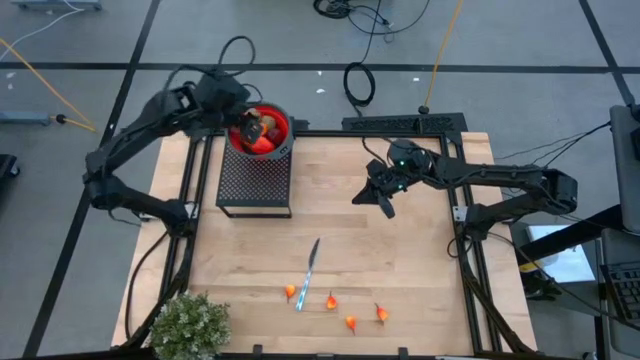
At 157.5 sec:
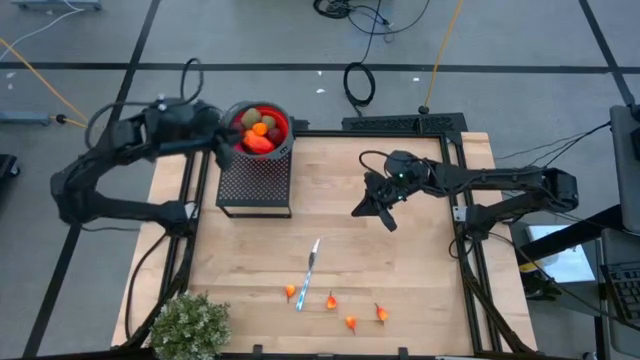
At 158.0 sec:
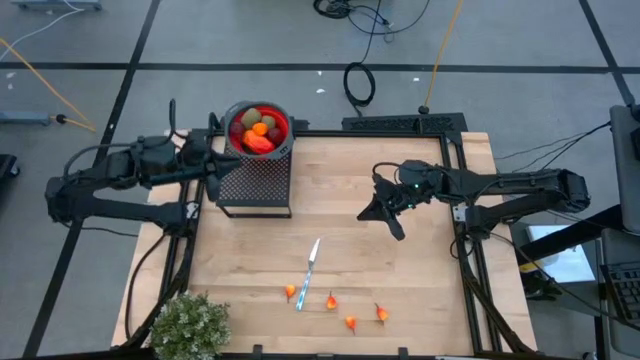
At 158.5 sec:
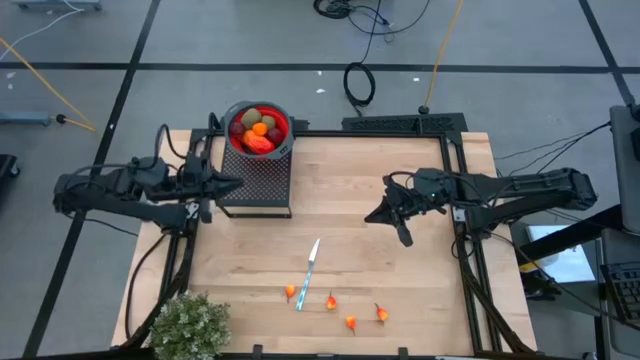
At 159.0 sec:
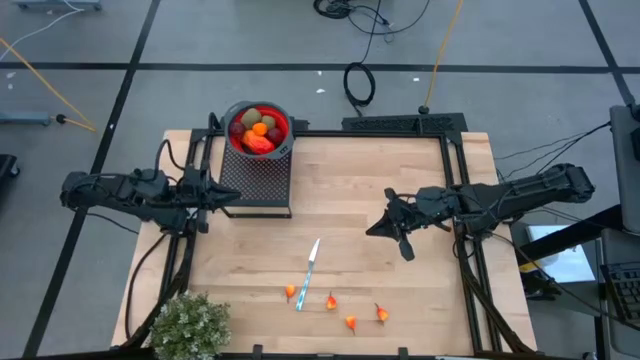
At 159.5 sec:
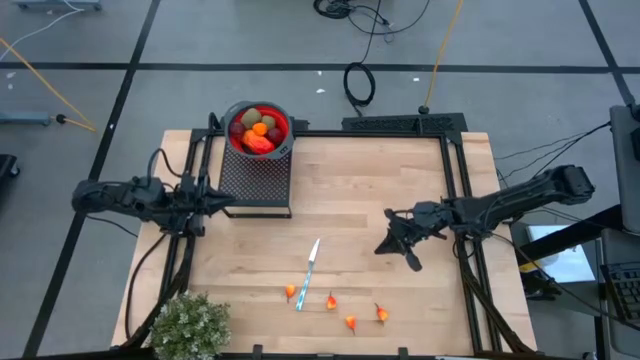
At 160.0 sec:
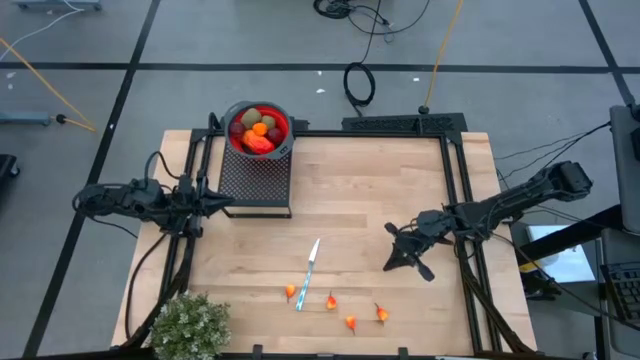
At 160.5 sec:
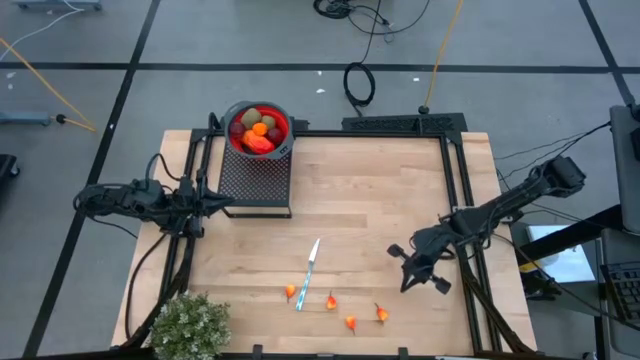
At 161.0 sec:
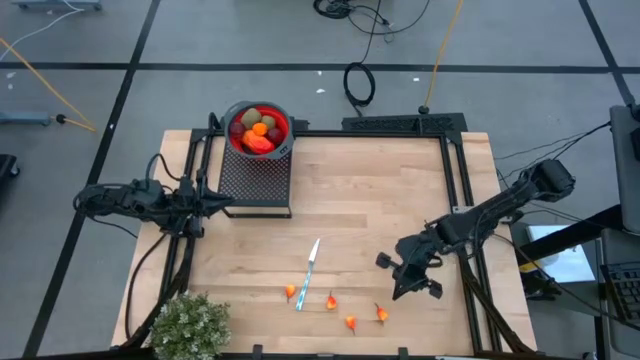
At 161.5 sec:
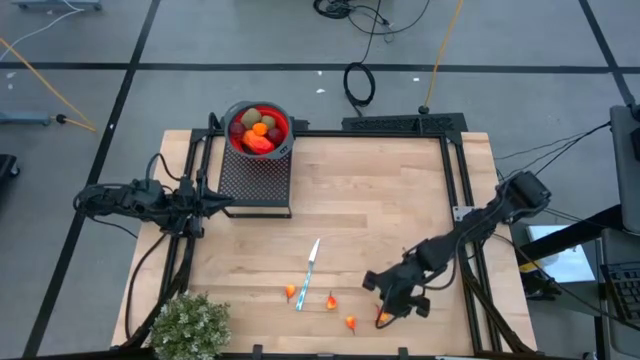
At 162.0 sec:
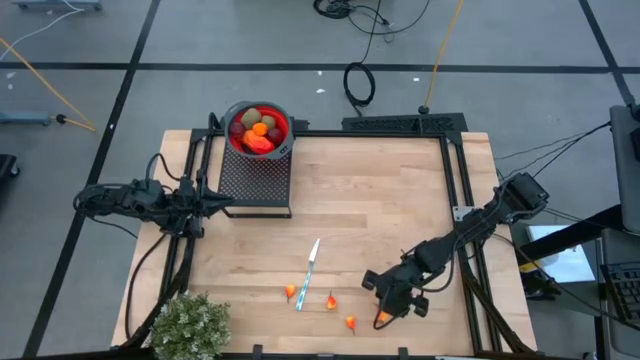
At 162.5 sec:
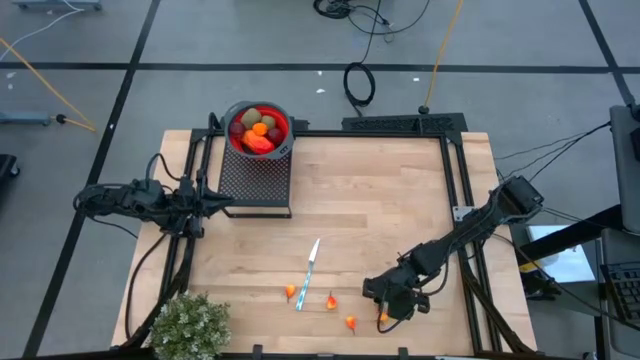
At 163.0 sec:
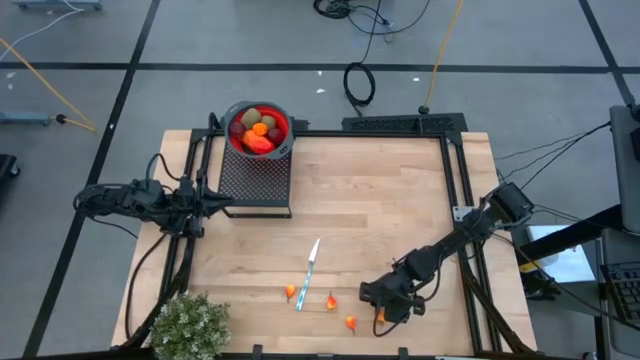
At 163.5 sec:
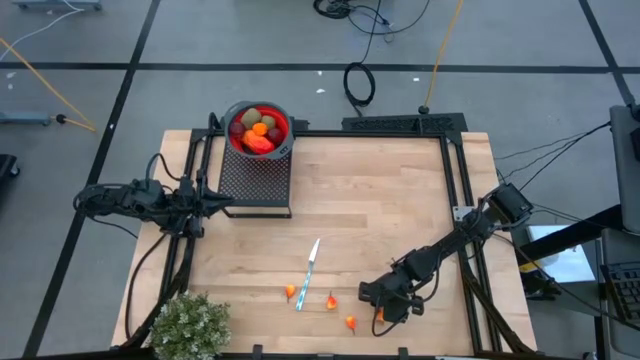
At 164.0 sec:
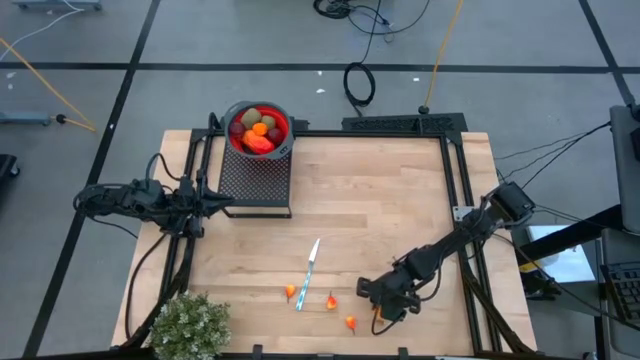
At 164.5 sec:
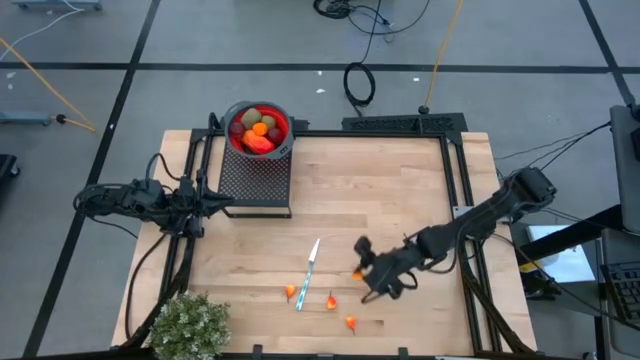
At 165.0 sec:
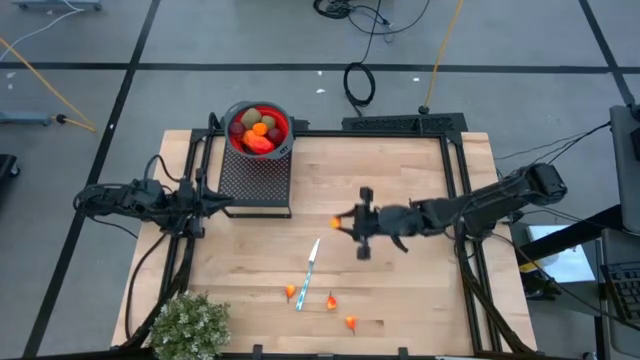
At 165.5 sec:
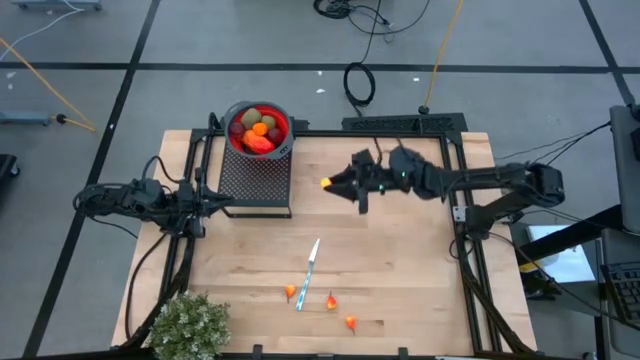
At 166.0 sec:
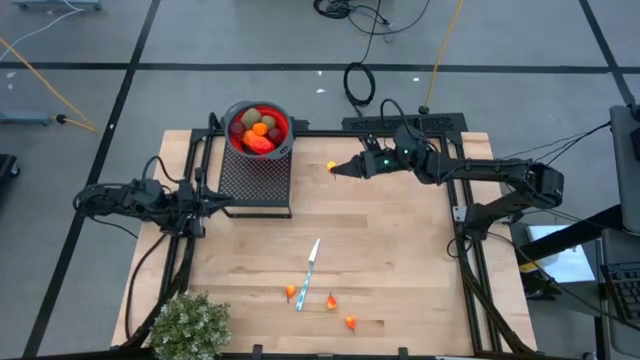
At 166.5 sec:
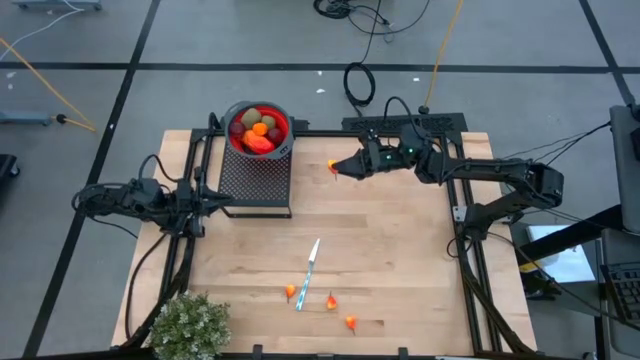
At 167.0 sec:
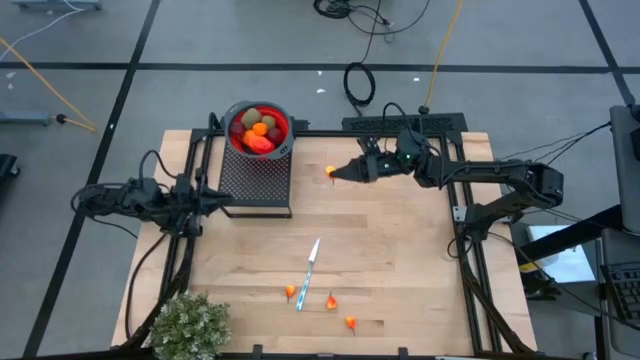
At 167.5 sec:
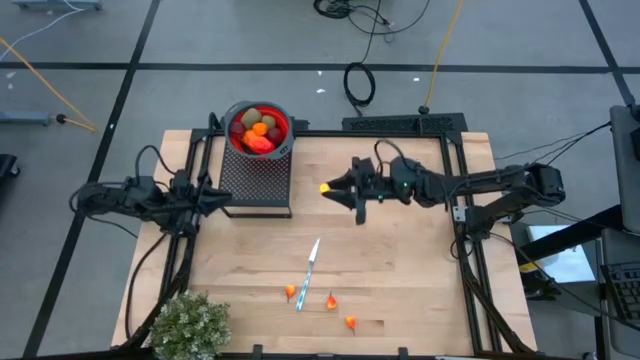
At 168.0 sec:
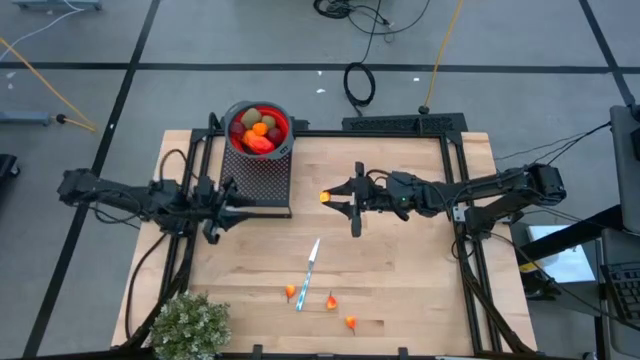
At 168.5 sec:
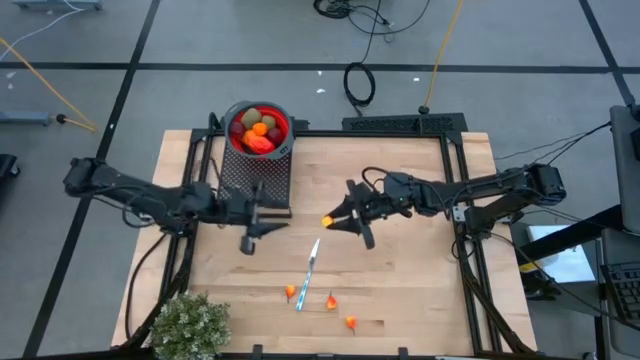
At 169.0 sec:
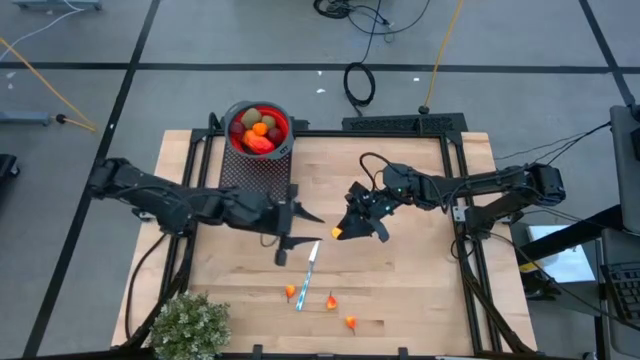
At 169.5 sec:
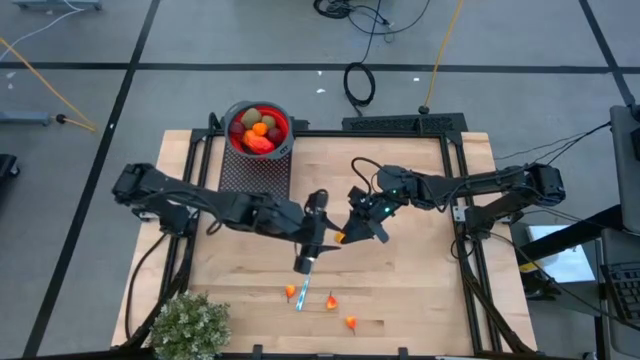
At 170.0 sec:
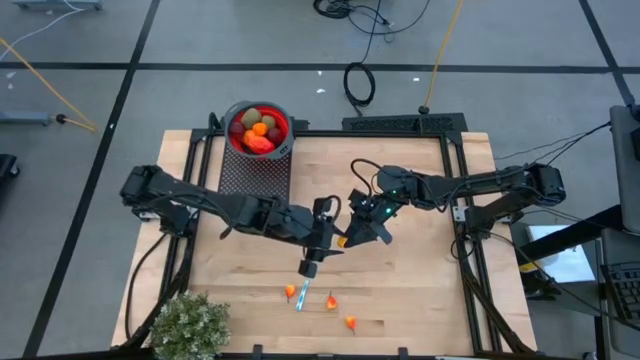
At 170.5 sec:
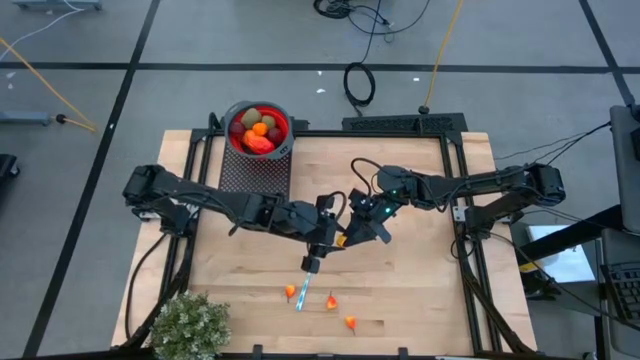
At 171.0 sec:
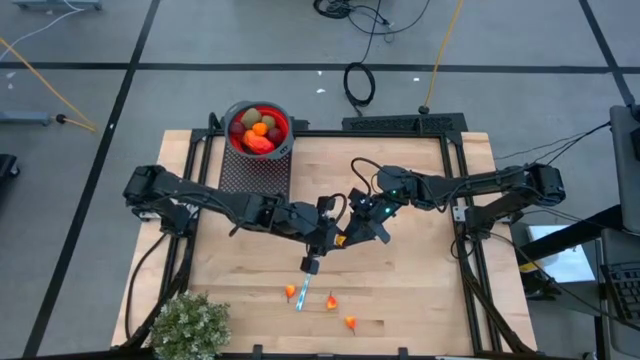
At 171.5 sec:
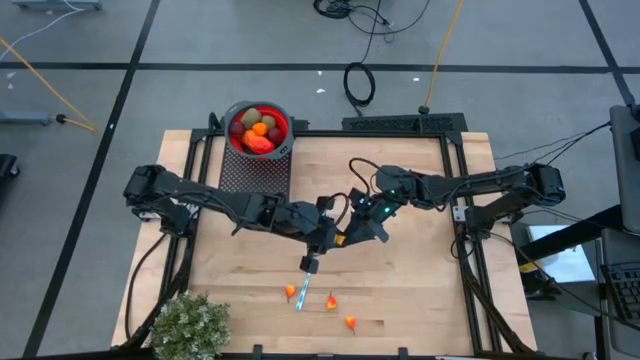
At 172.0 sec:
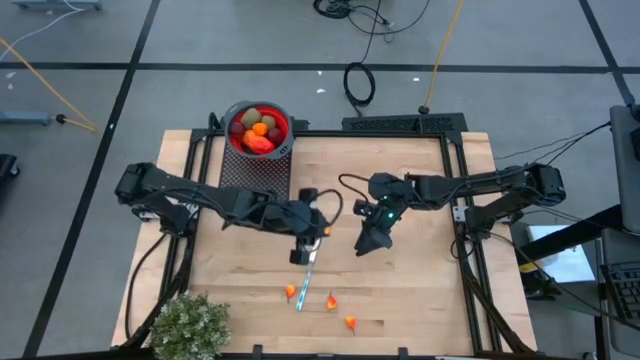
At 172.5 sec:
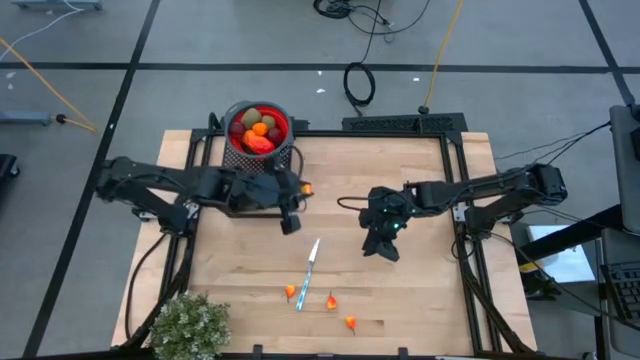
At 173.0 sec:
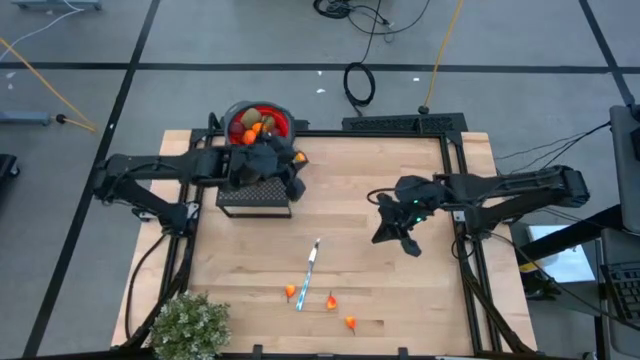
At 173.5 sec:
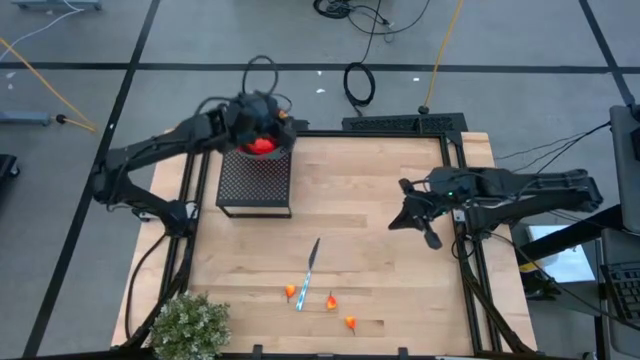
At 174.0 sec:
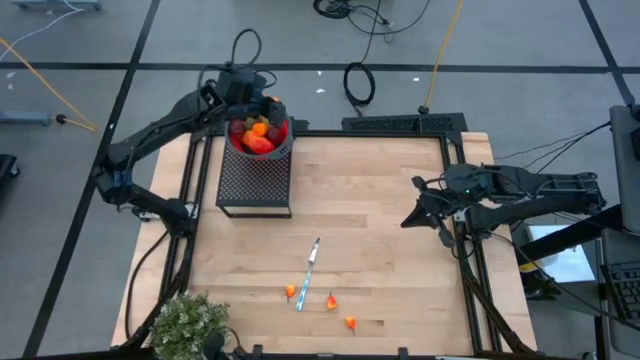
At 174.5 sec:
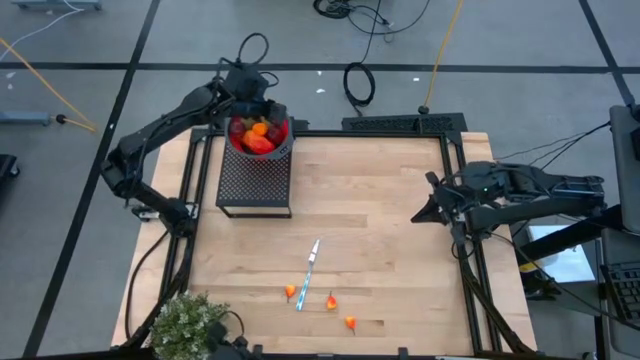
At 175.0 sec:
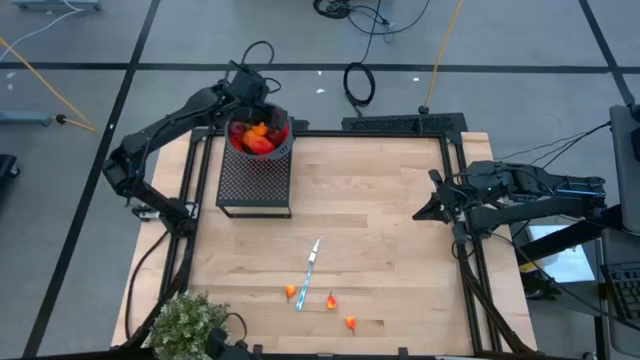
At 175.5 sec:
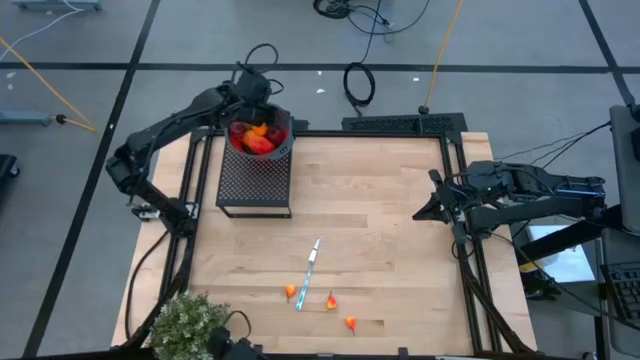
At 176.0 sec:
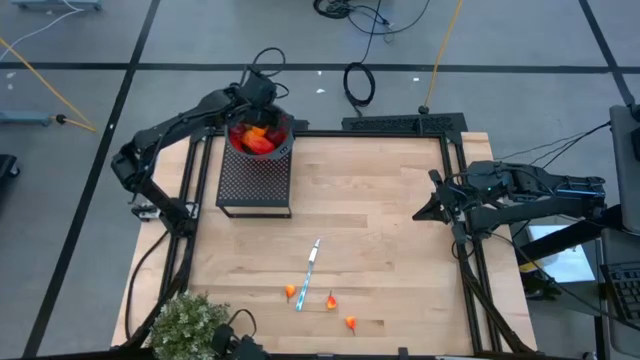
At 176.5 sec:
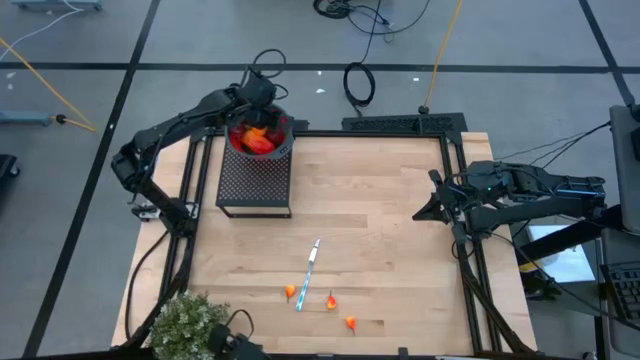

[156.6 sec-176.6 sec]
Task: Pick & Place Fruit
Put the orange pear into the red strainer bowl on the shelf

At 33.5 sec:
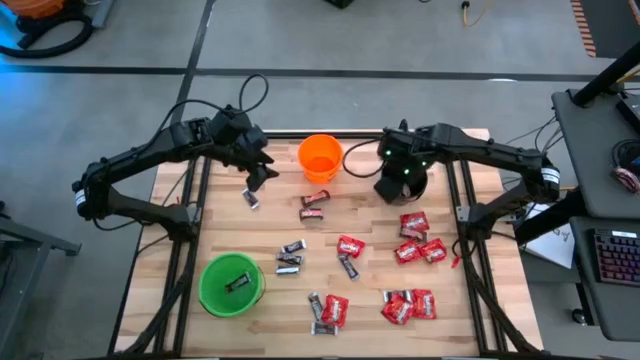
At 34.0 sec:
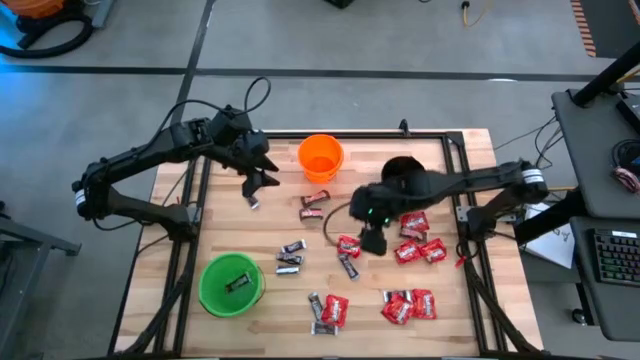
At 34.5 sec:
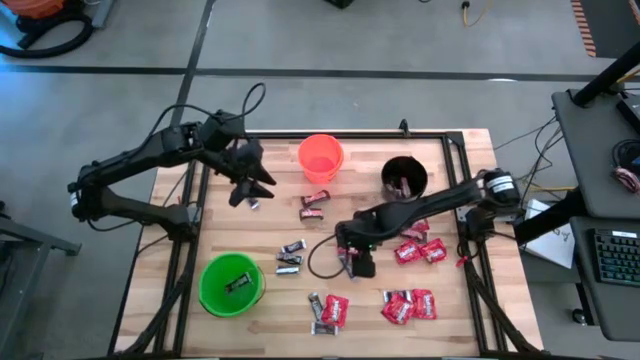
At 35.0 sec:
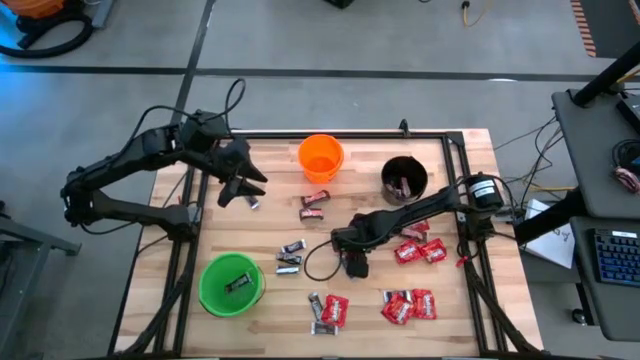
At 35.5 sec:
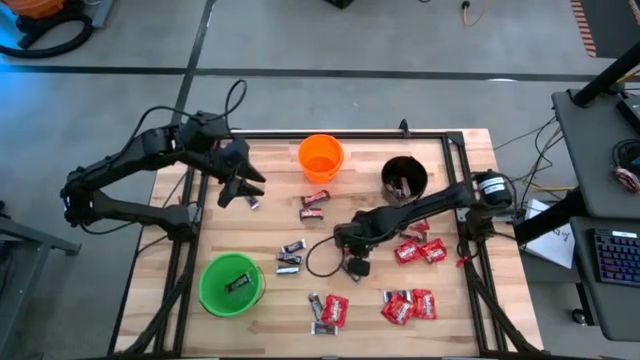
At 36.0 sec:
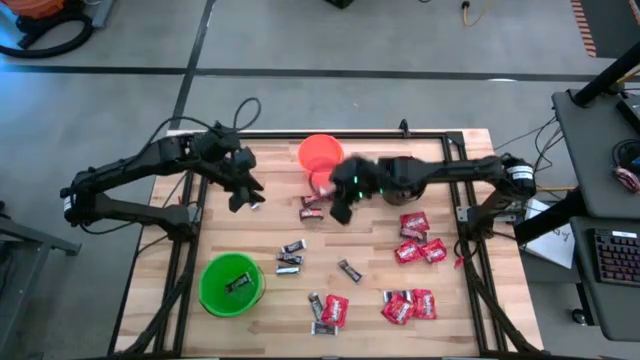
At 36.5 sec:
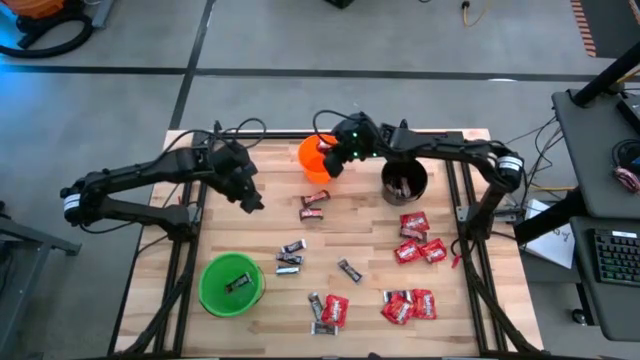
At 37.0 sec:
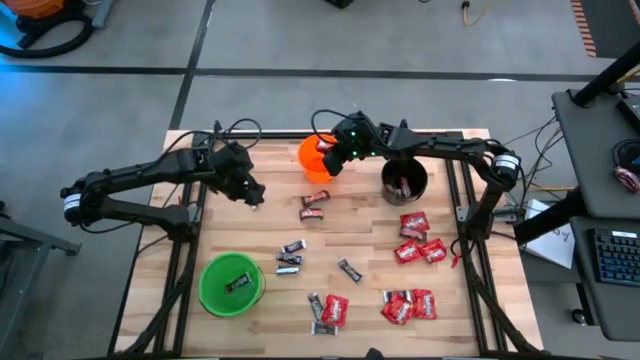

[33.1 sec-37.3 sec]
Task: Sort candy
Put the red candy into the orange bucket
